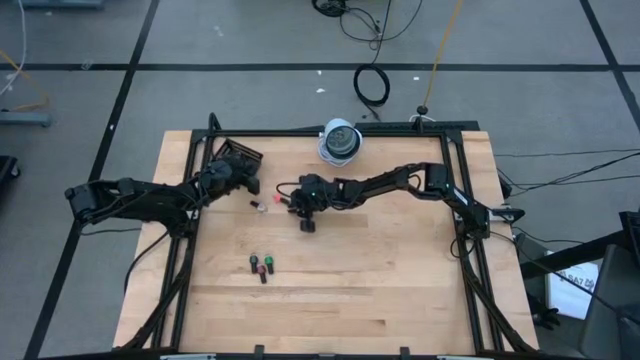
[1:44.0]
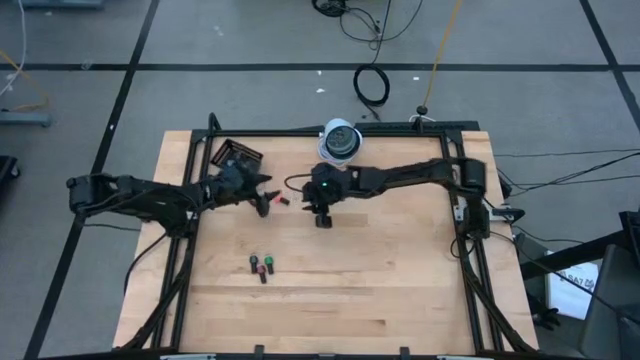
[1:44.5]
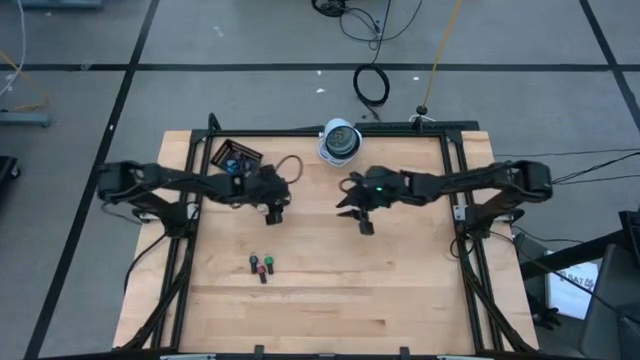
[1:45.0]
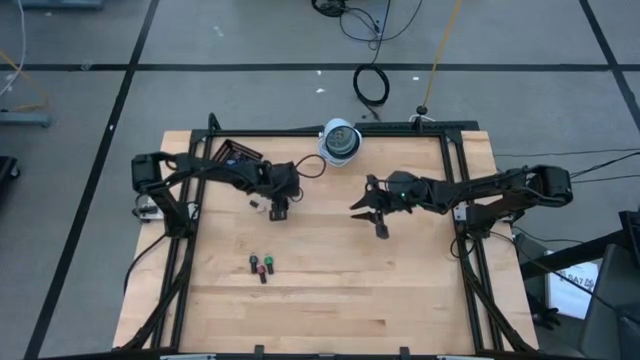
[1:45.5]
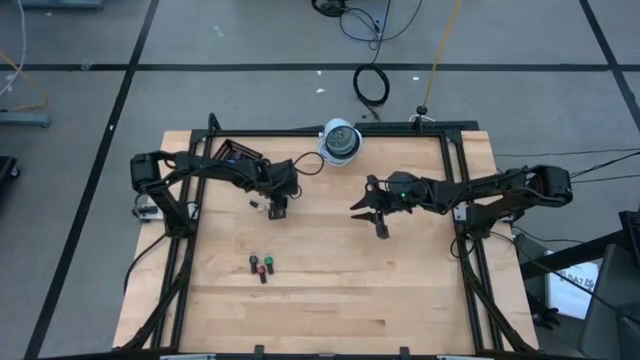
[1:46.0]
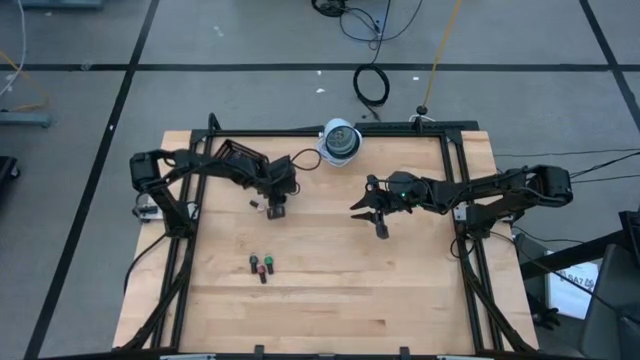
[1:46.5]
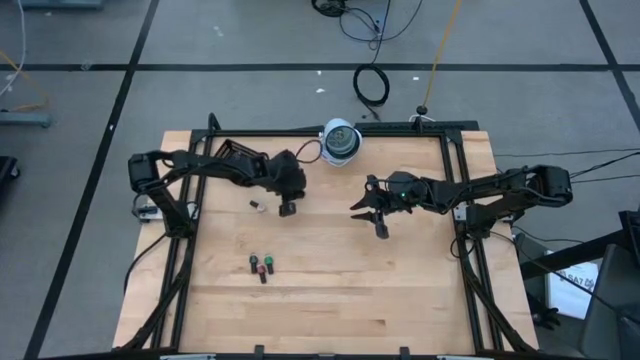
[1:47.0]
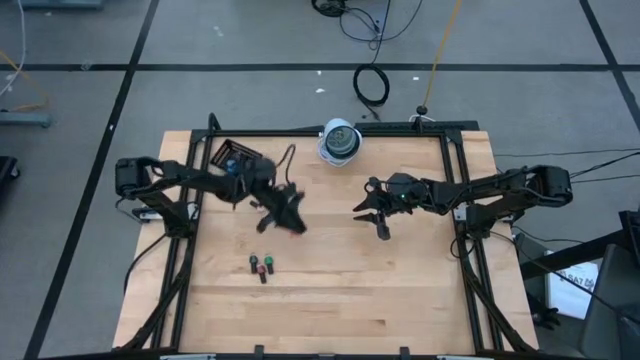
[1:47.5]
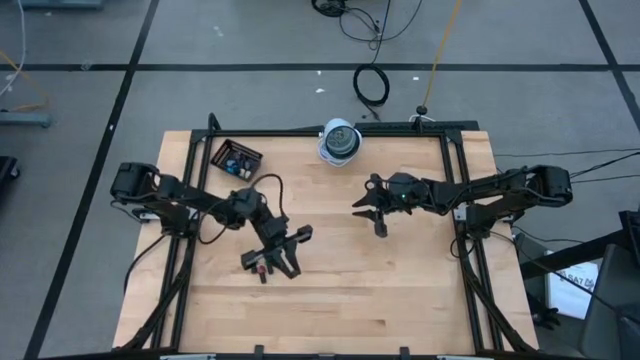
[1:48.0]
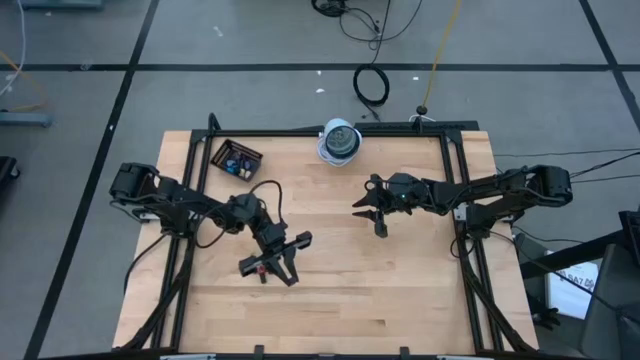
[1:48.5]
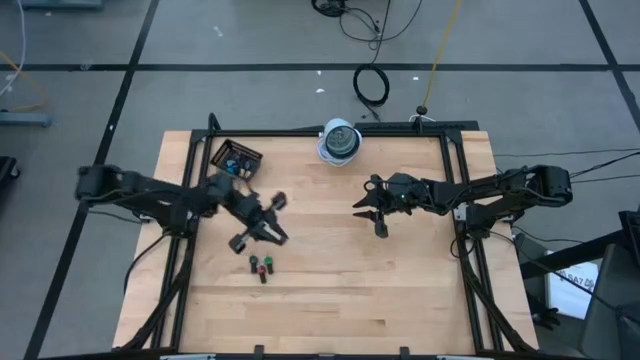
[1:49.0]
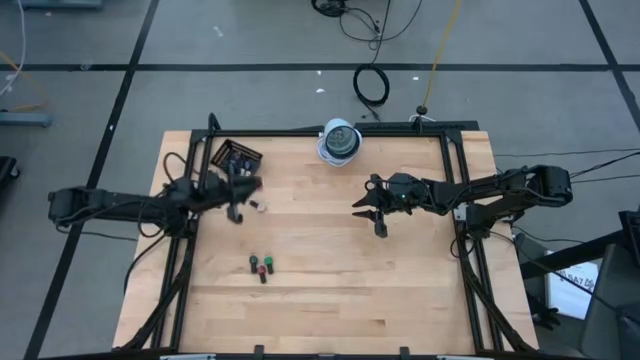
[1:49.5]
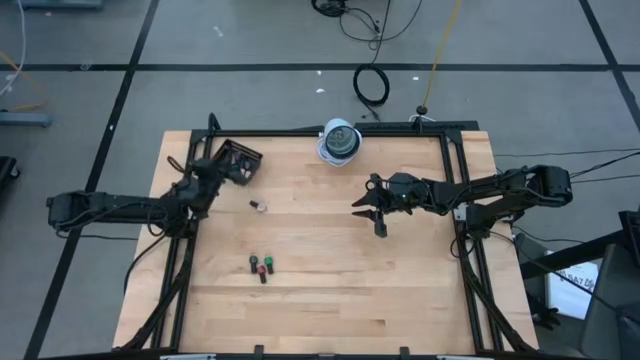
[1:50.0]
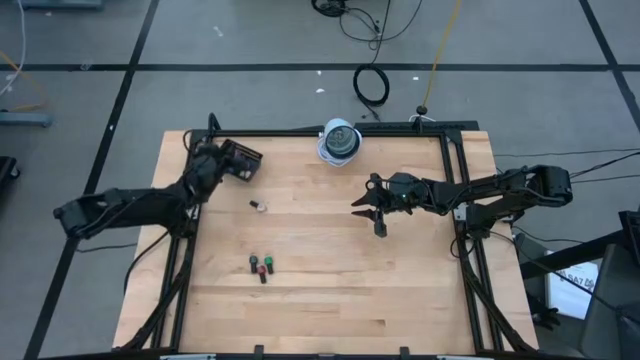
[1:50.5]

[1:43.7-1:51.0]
Task: Pick & Place Nail Polish
Put the pink nail polish bottle into the black basket

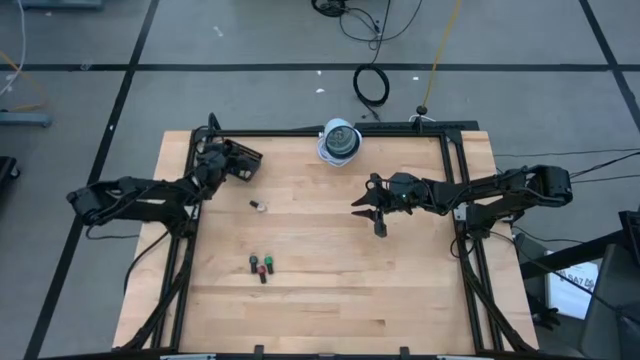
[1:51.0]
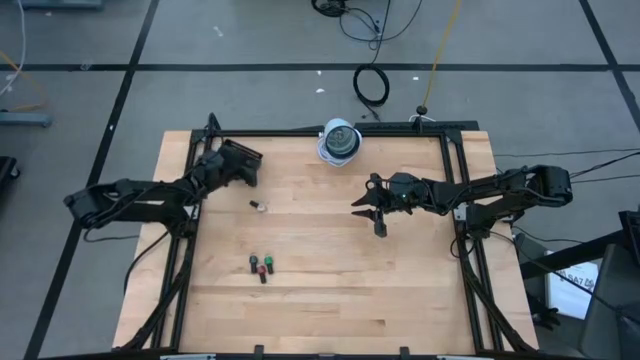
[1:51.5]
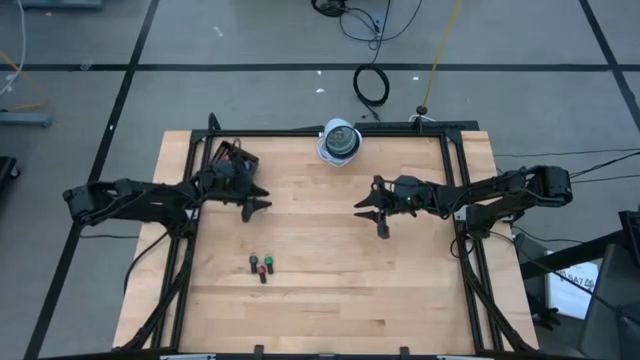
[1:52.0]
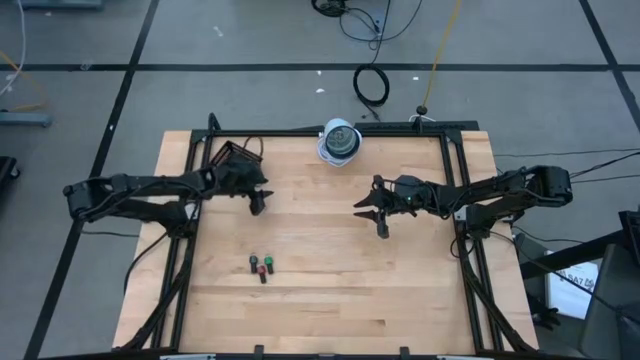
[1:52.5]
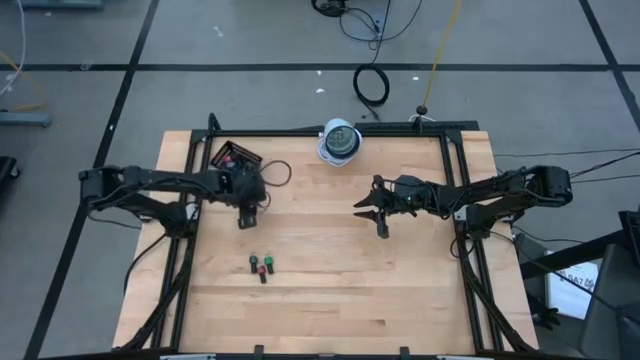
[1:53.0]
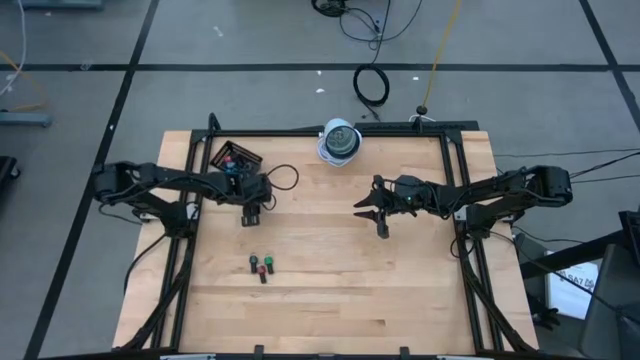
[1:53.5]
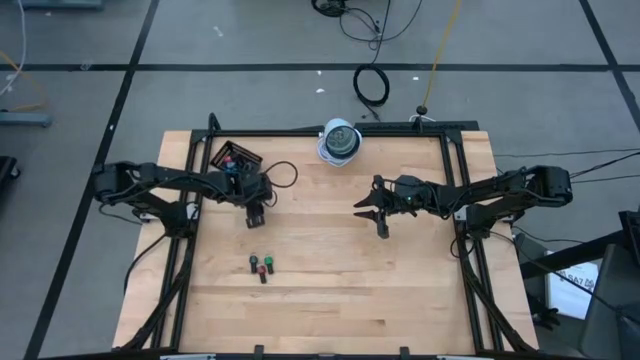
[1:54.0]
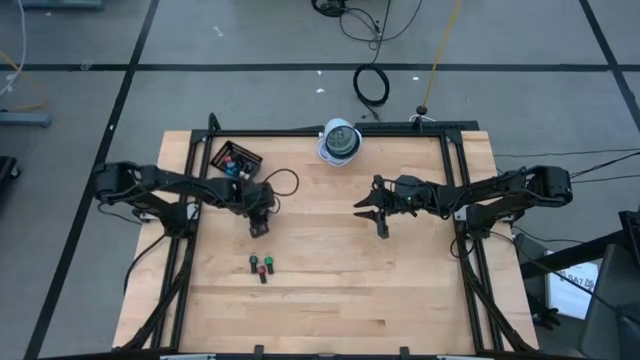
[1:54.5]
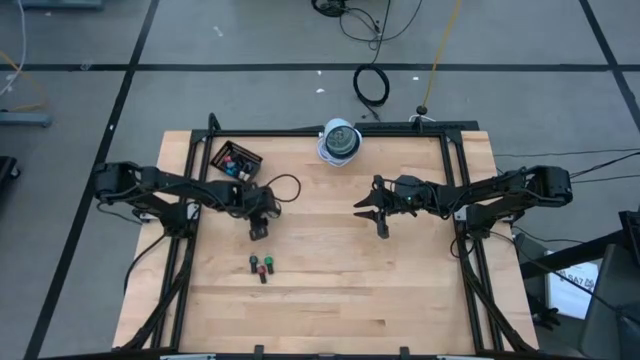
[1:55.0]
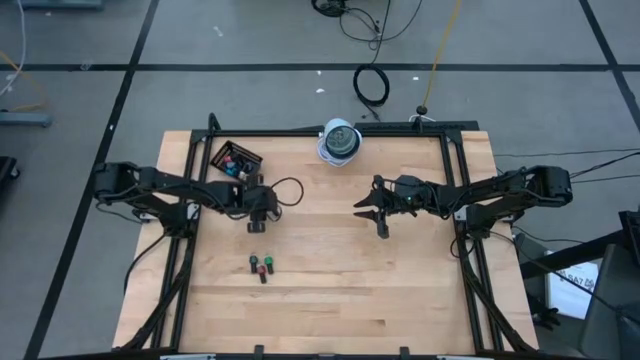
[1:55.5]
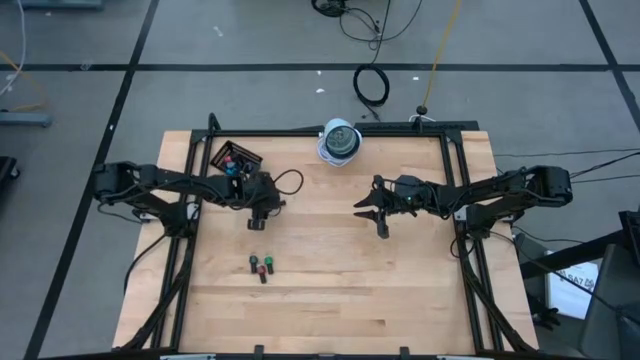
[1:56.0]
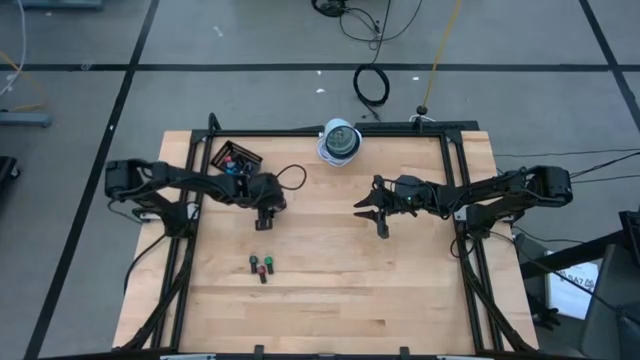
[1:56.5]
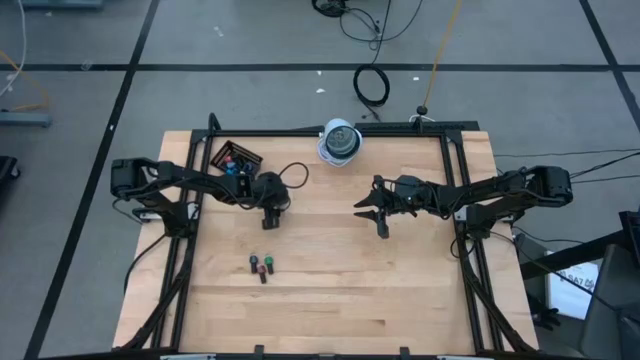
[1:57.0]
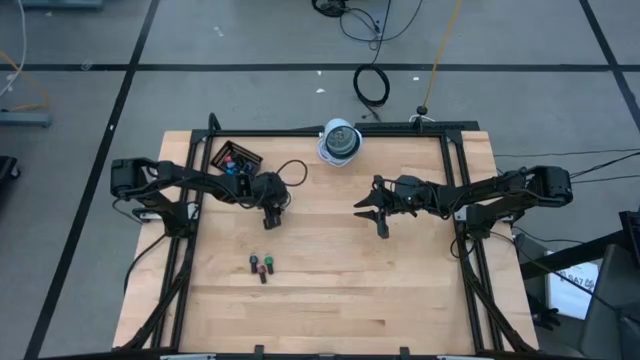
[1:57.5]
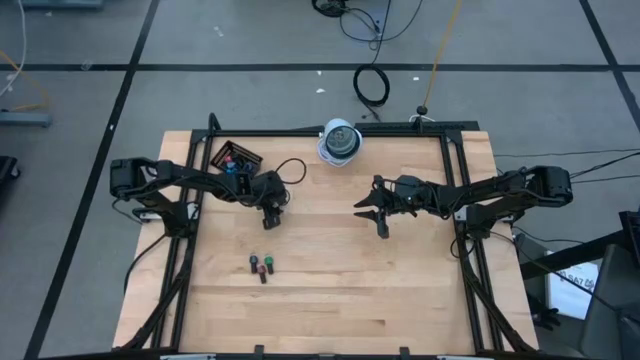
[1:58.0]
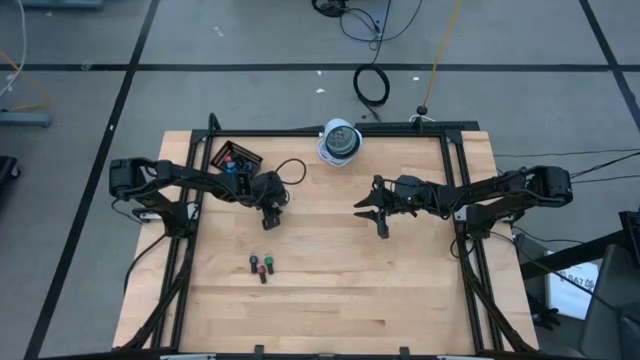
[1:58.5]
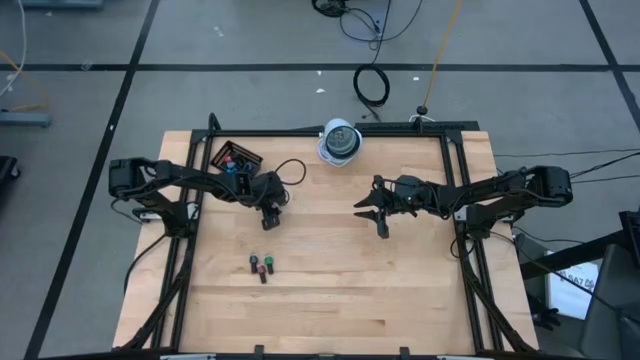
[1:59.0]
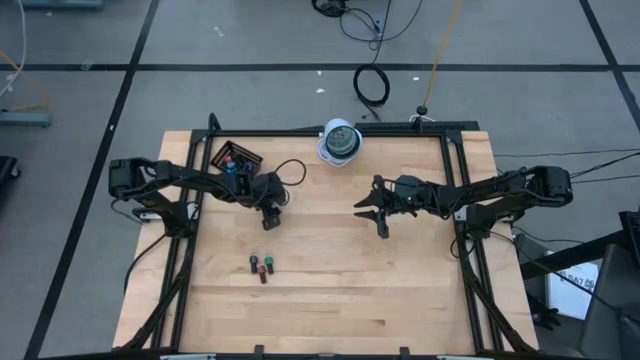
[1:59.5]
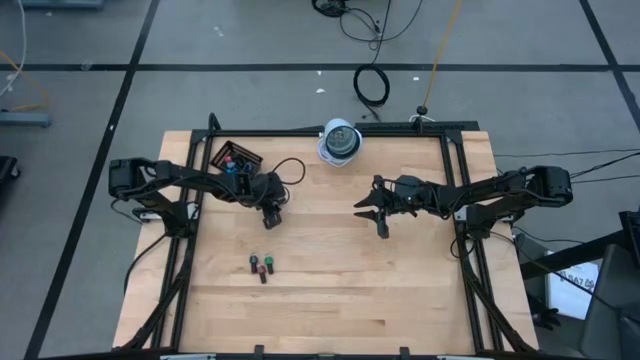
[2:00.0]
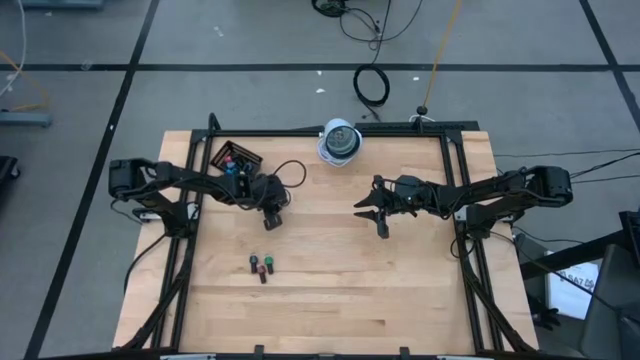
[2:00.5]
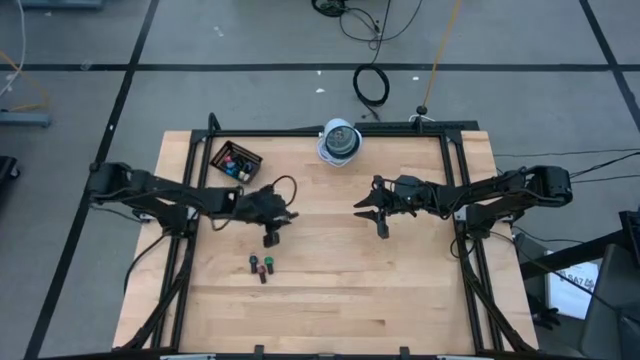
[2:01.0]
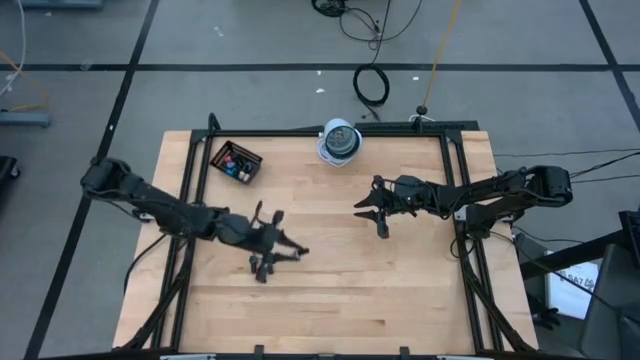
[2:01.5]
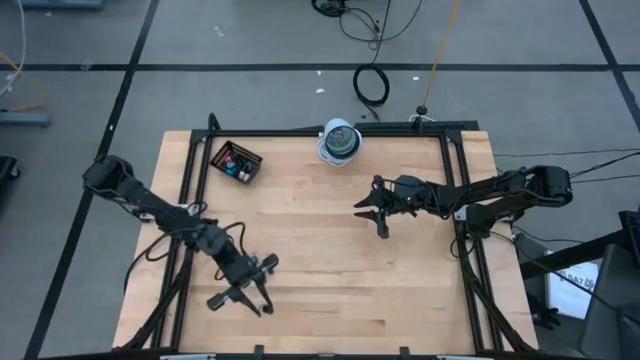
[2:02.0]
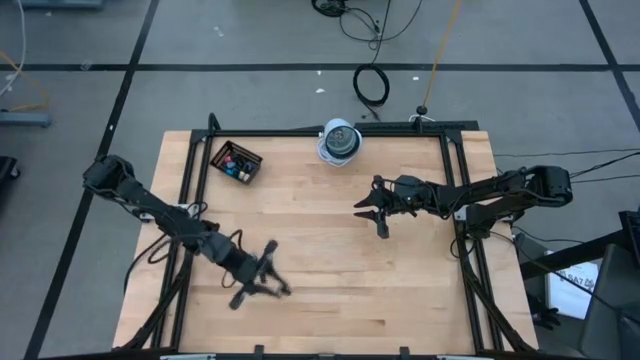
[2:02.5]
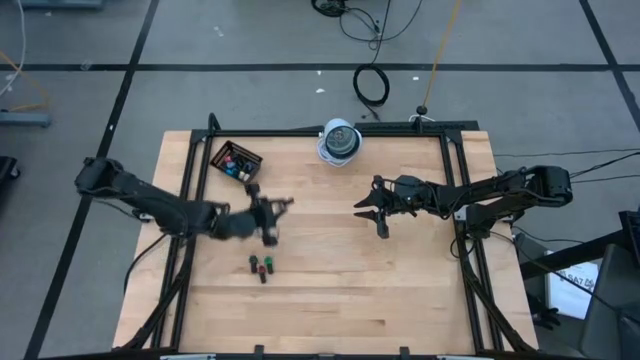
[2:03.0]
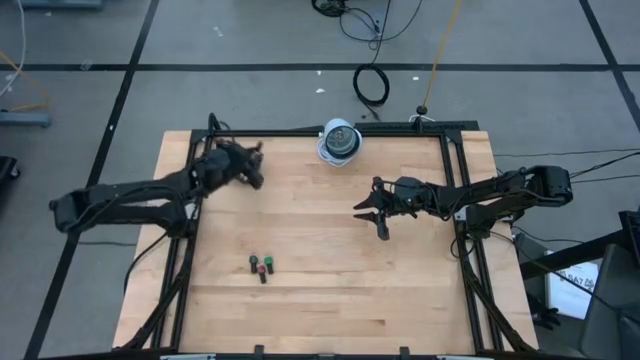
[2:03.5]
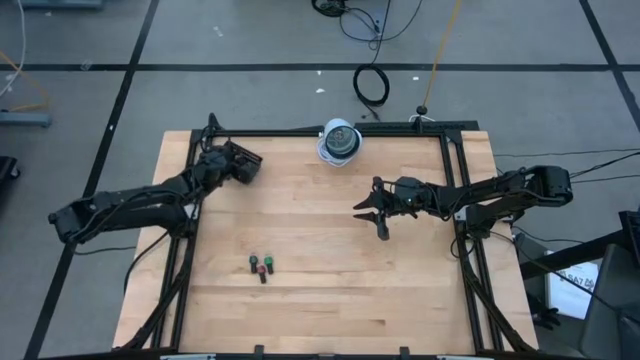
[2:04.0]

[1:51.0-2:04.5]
Put the white nail polish bottle into the black basket

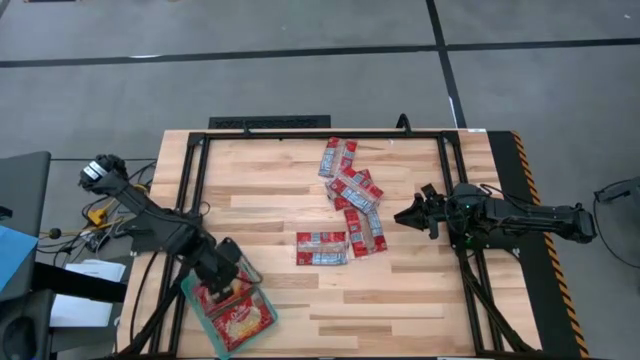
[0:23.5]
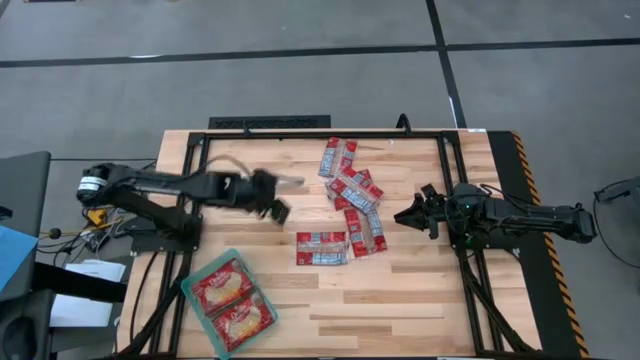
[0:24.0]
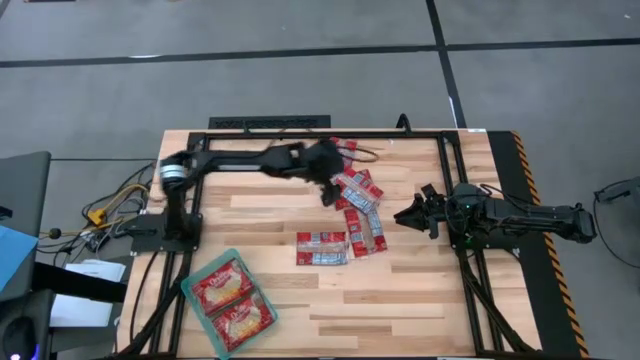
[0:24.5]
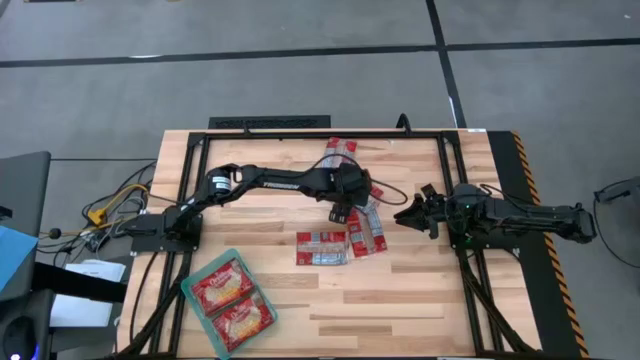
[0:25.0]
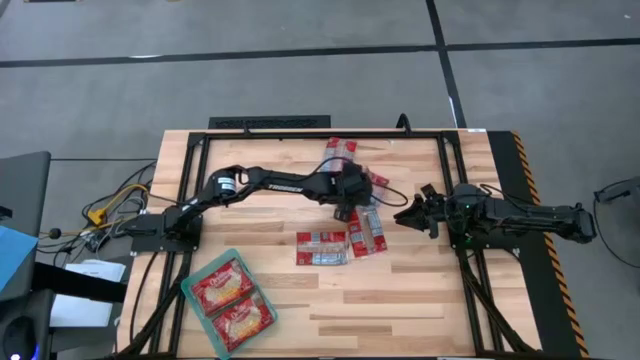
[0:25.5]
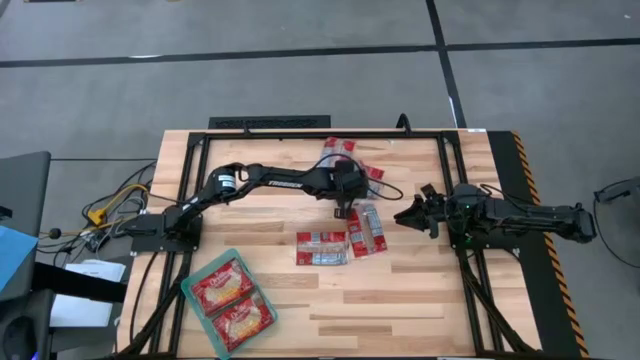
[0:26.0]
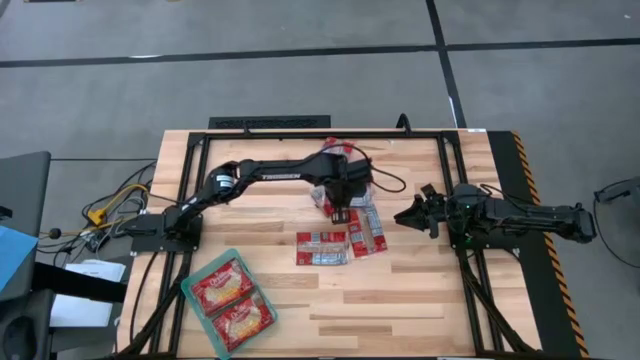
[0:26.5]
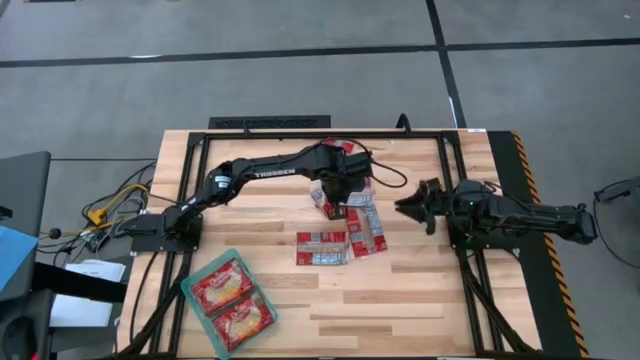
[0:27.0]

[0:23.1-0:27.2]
Task: Sort popcorn bags into baskets
Put the red popcorn bag into the green bin
